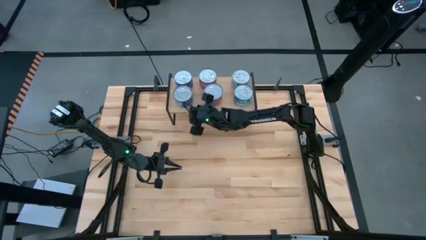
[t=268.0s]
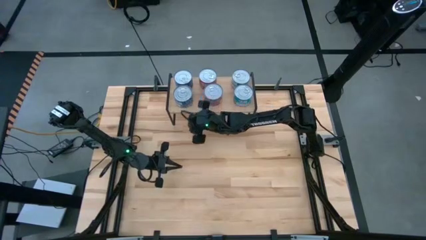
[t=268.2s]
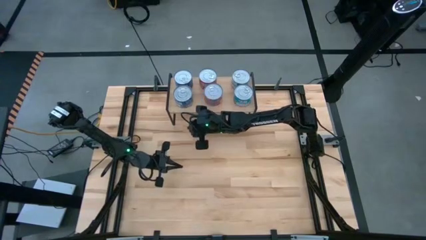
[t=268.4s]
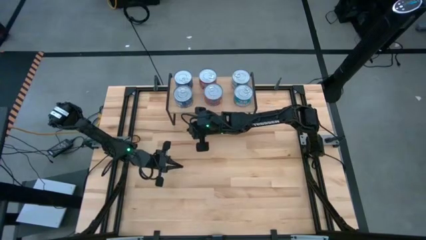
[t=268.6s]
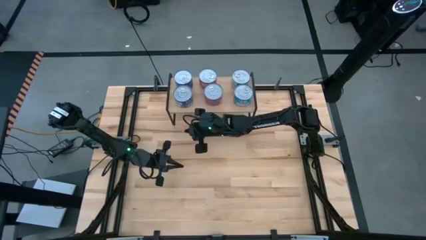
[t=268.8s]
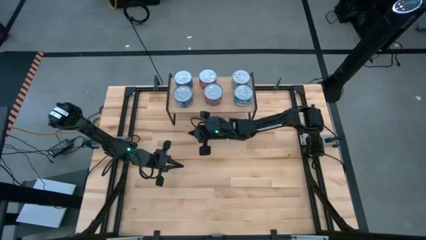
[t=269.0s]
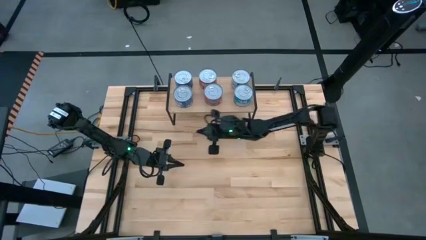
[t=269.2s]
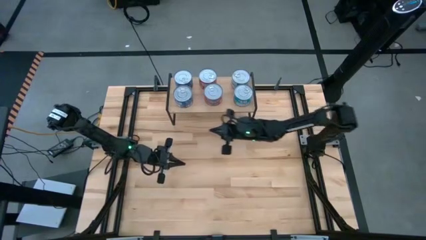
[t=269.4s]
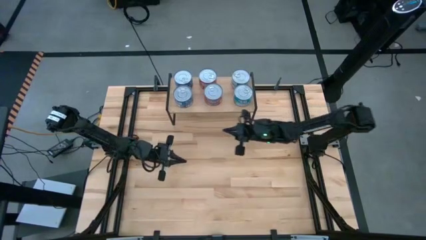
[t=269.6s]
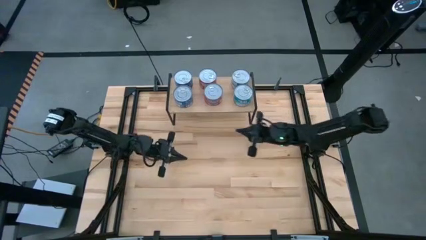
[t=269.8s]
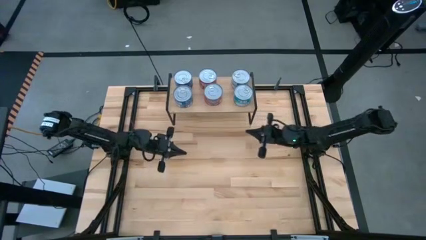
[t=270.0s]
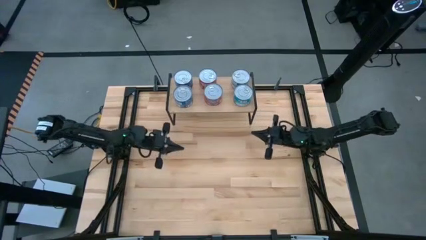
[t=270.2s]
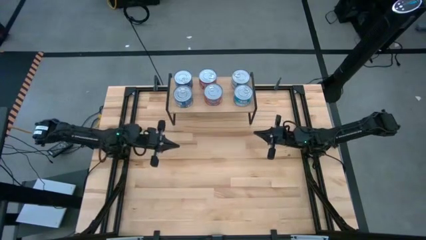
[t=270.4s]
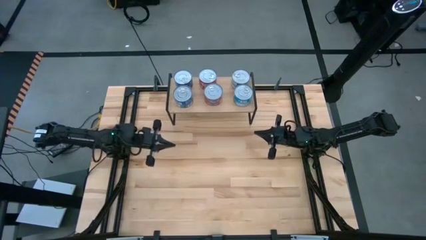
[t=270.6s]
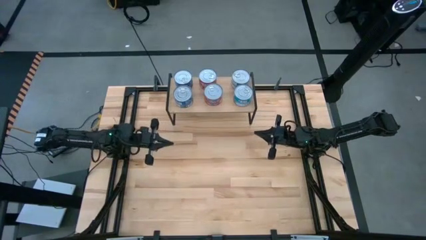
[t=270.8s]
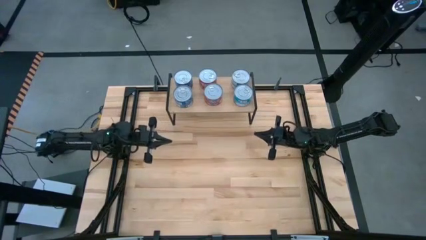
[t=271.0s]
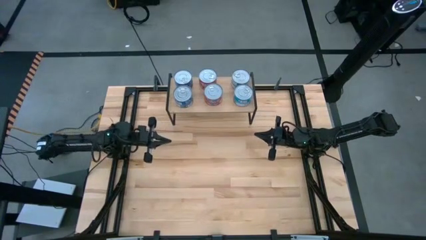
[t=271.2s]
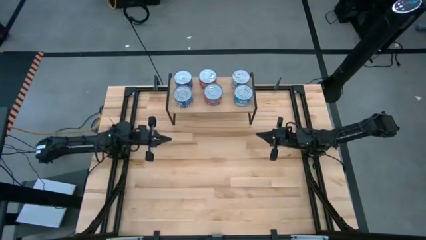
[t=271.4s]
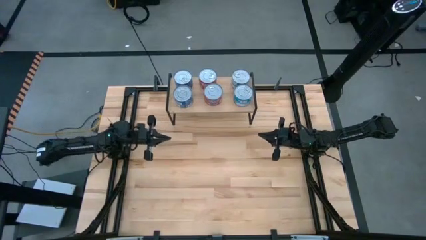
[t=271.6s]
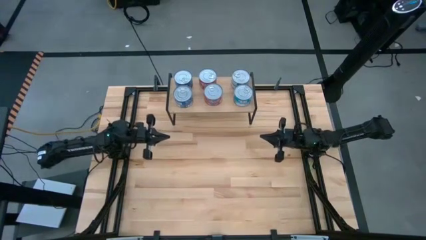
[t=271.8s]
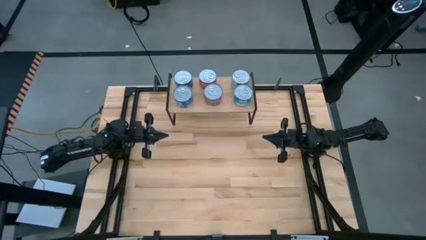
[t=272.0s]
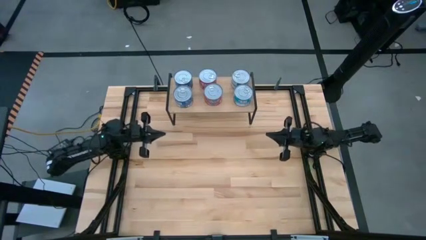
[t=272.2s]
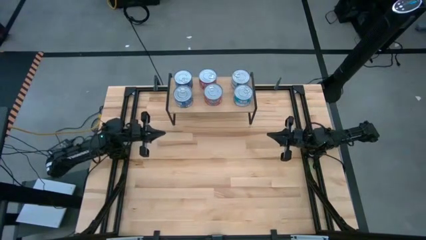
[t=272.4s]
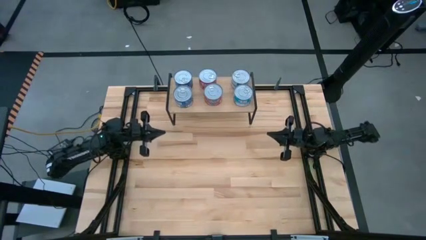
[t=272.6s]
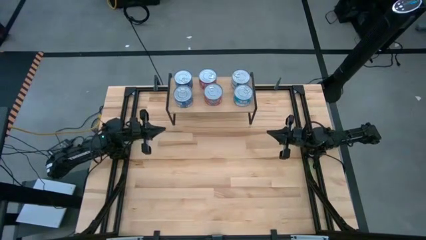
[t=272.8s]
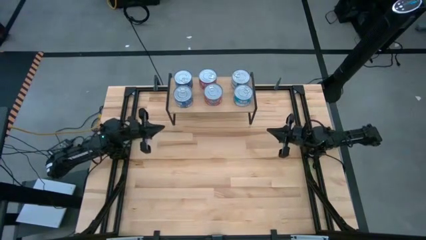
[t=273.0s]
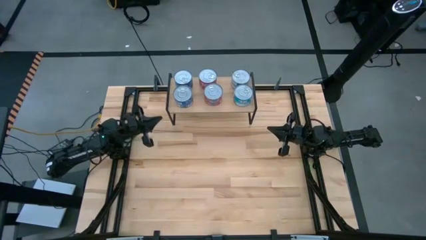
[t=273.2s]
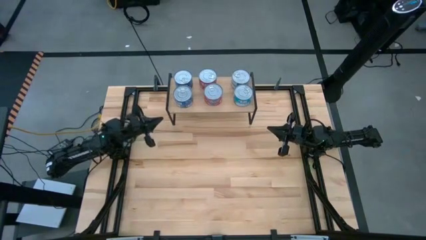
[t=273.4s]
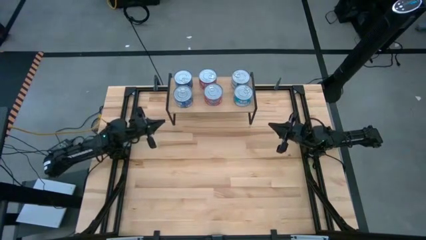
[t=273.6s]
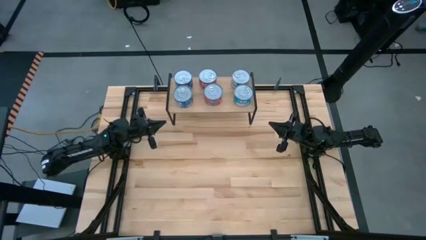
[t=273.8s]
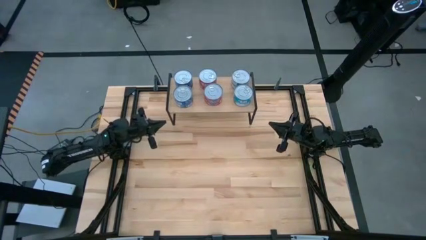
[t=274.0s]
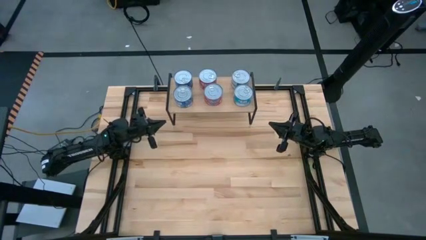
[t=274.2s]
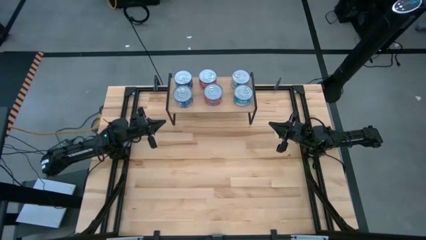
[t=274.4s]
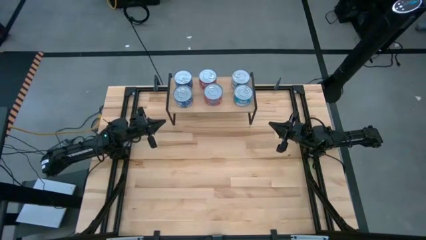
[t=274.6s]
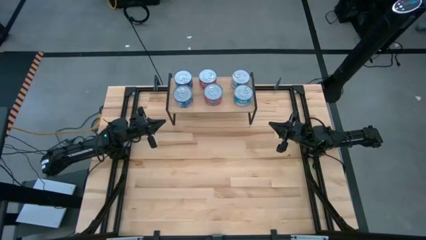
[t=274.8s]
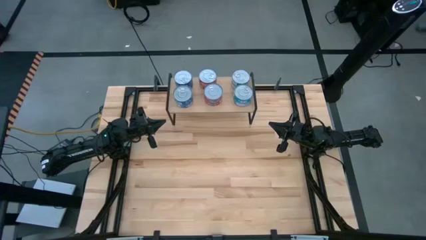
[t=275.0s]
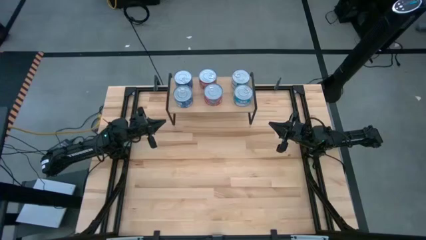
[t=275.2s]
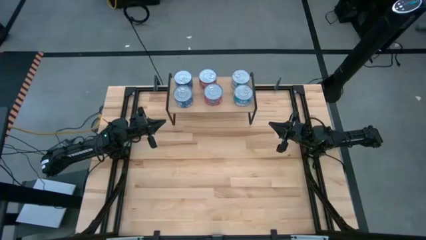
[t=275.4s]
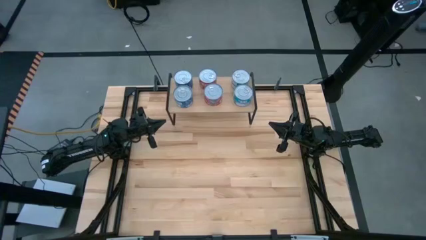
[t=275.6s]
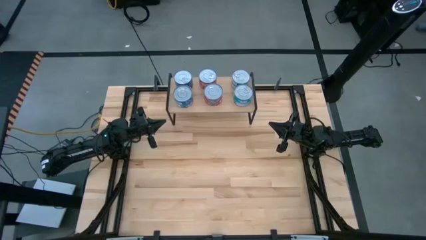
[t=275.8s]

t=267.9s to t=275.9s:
Task: Stack canned seafood by type on shelf
Return to Home Position
